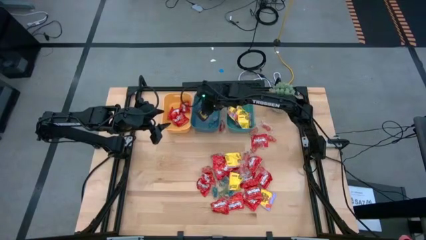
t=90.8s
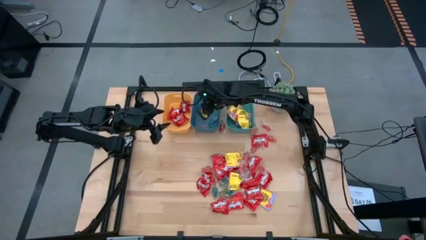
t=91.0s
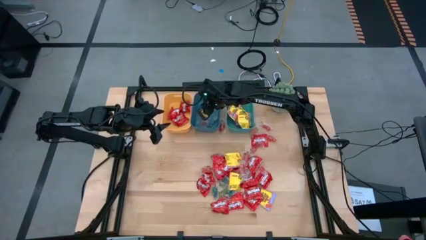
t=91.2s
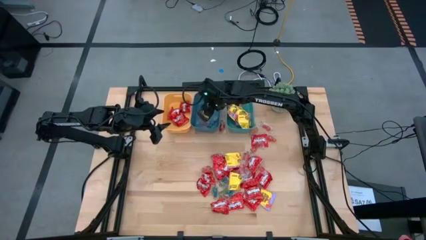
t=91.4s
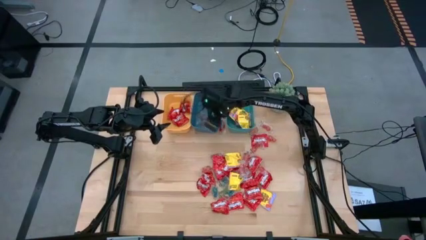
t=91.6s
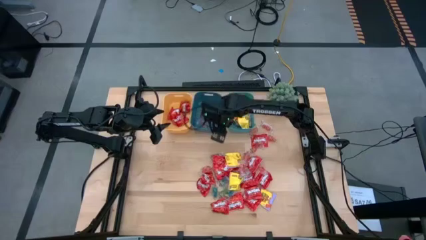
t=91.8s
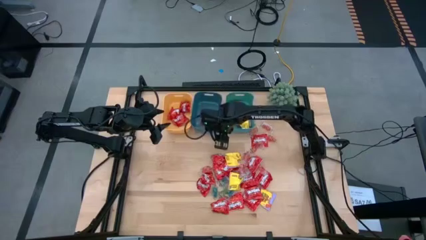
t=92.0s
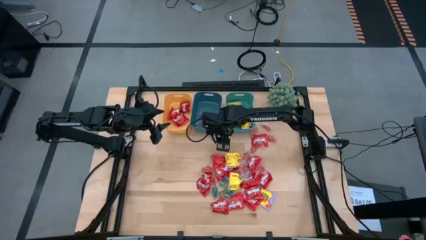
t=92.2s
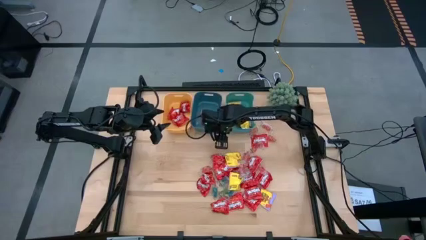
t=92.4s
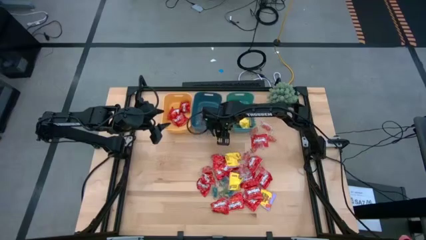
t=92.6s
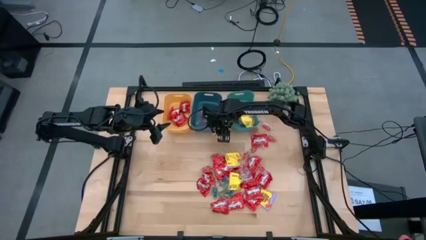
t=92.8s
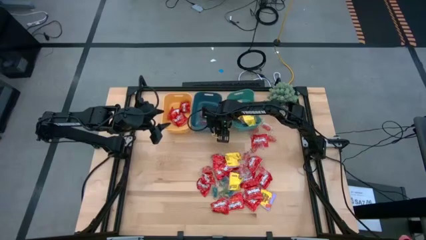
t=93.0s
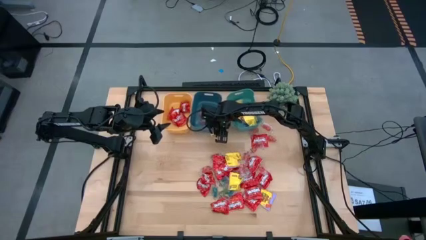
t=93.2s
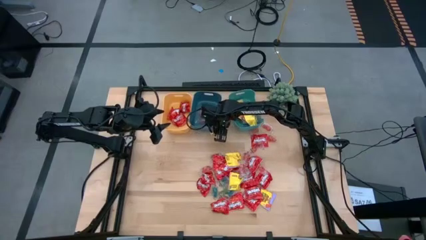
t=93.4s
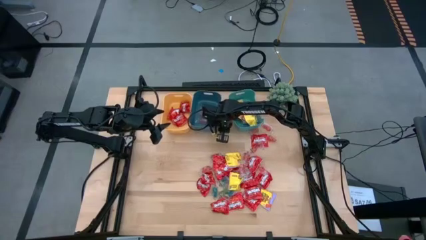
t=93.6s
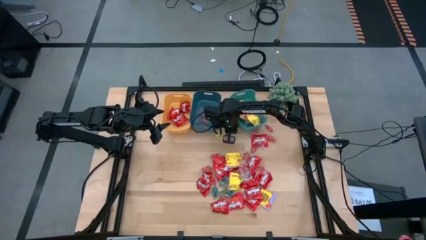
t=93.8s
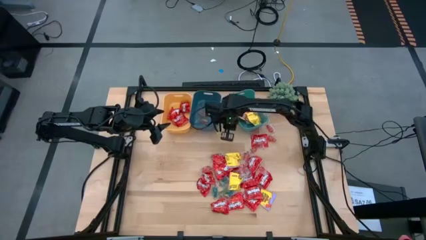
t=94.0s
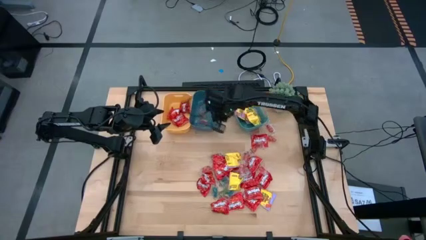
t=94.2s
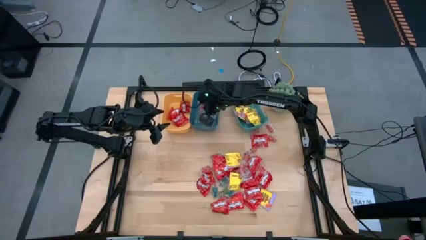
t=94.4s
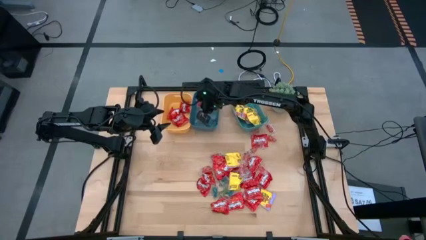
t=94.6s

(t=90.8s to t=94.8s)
Task: Sort candy
Put the transparent red gummy into the blue bin

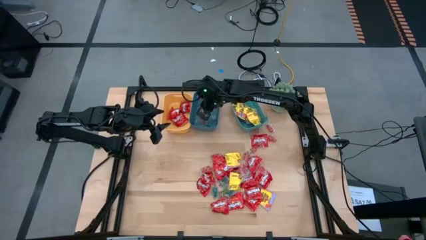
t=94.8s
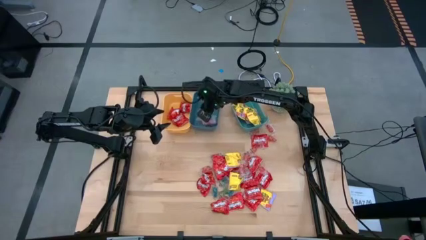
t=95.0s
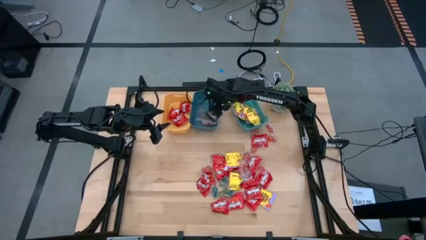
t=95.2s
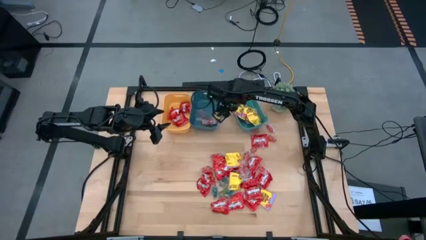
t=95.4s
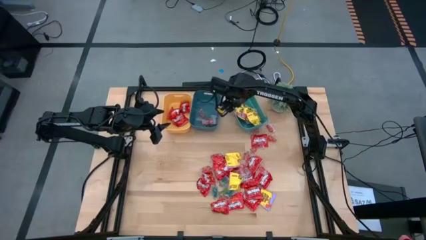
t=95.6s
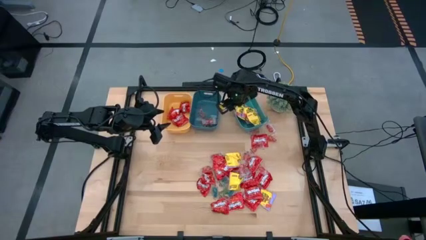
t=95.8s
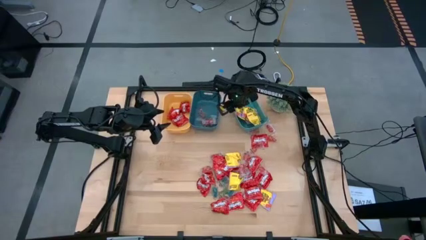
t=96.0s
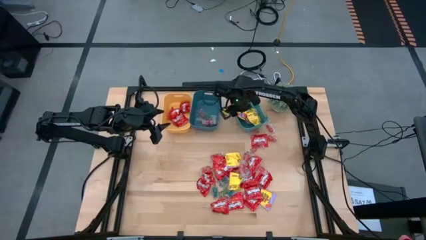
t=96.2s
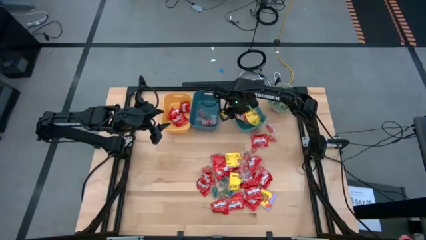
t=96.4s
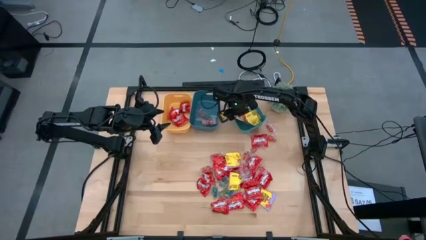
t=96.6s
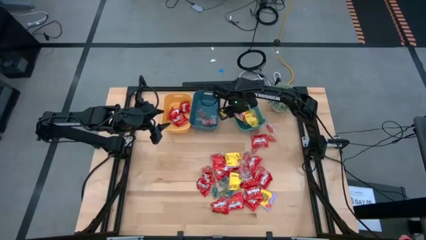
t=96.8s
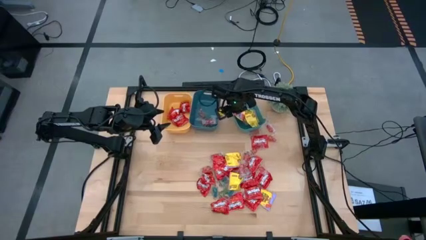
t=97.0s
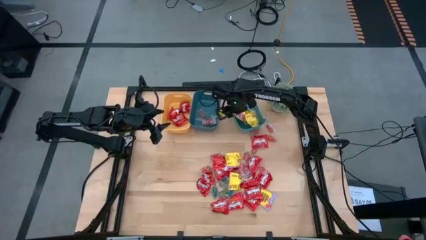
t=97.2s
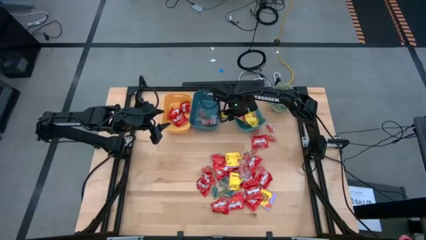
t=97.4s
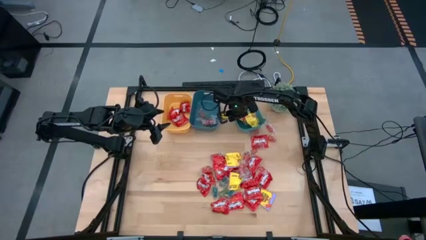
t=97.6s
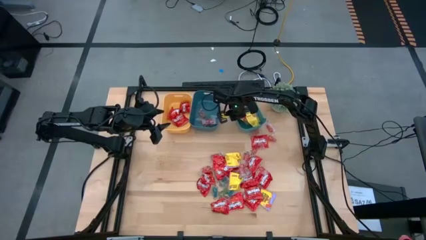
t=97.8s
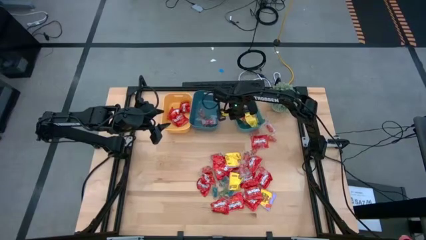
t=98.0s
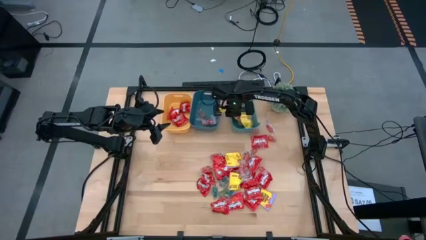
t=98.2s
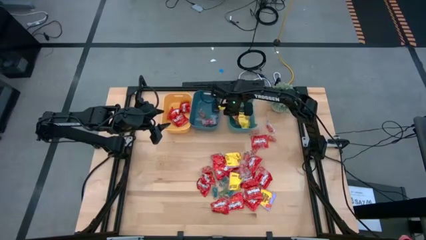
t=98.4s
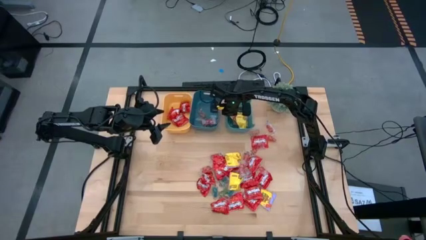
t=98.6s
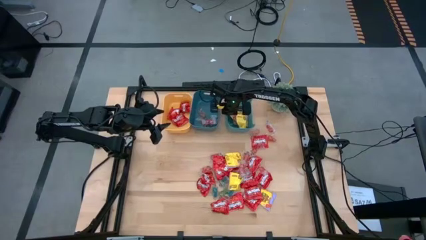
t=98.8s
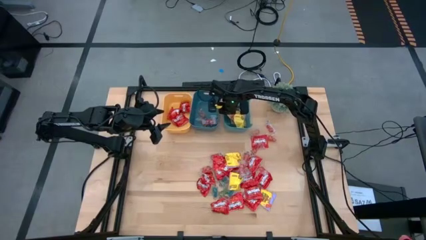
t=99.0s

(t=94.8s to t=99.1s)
Adjust the green bin

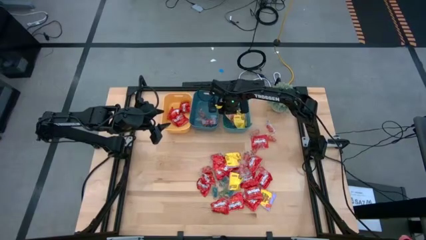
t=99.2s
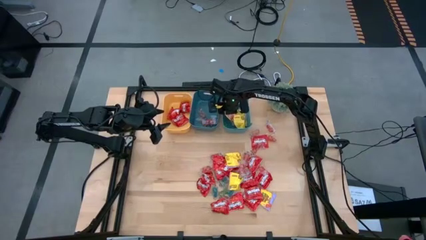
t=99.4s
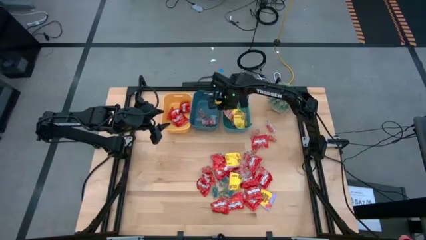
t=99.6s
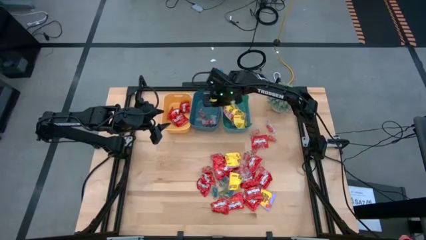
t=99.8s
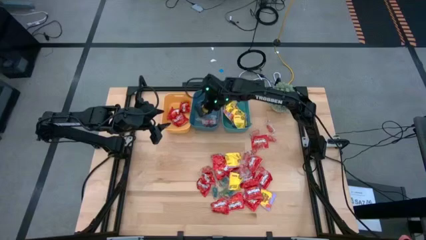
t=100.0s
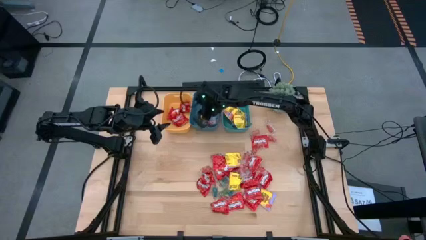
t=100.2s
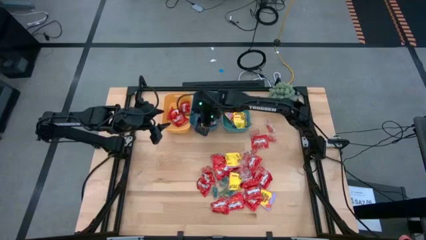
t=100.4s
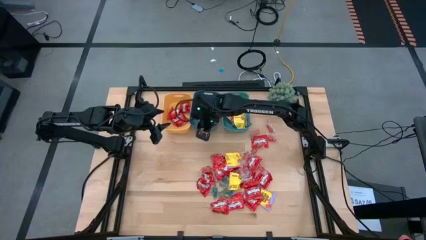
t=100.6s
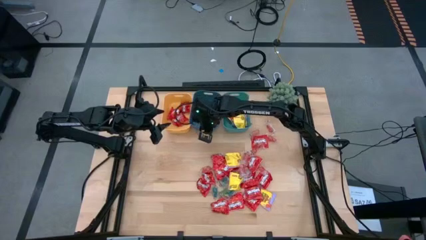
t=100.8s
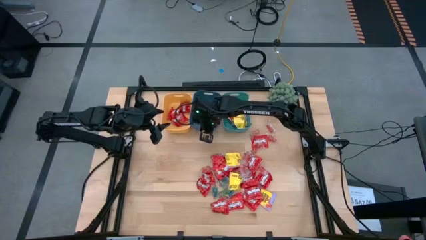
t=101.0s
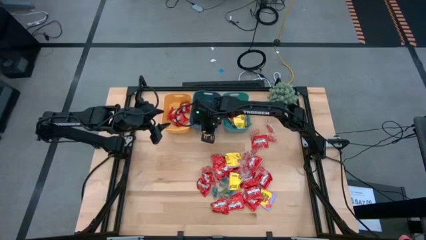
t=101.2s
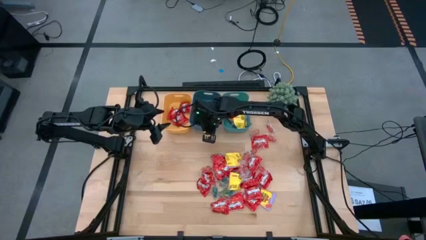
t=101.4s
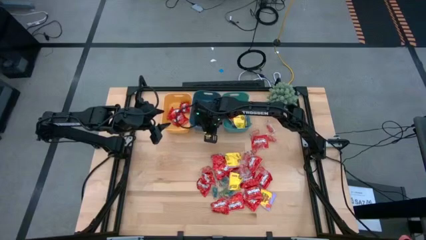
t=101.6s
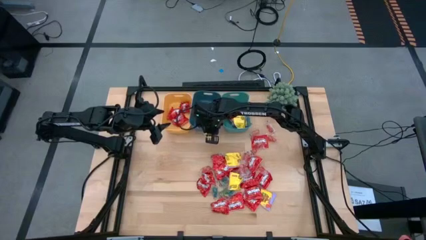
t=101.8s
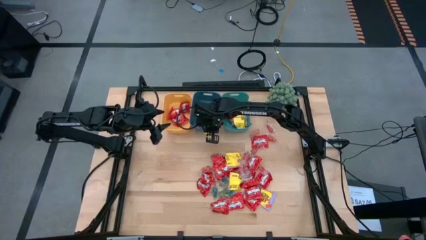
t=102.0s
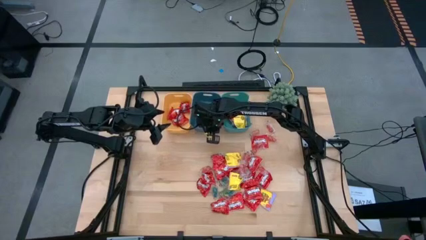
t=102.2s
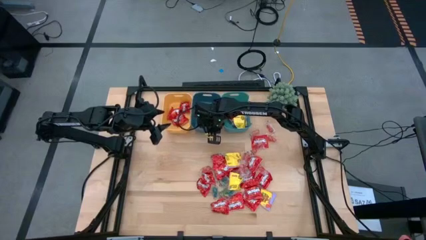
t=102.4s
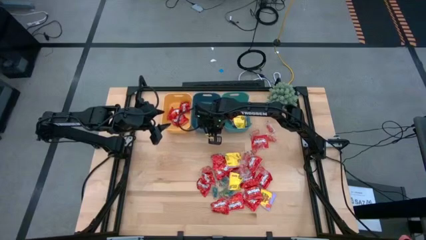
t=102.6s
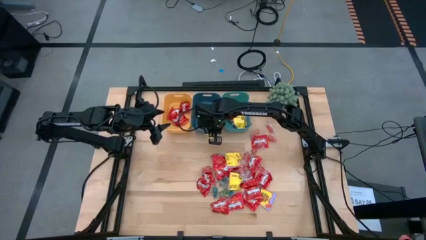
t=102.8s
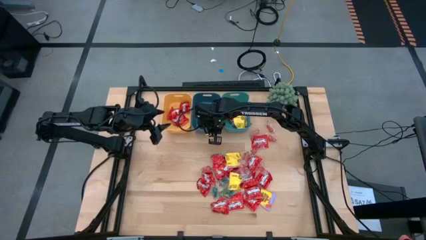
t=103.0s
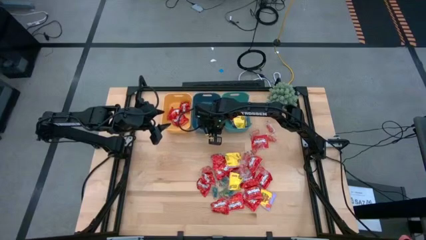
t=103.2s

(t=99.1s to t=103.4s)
Adjust the blue bin

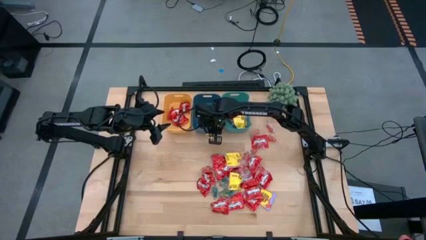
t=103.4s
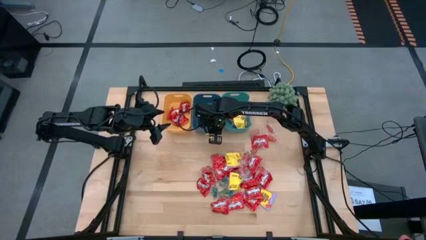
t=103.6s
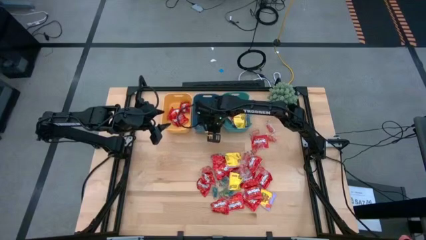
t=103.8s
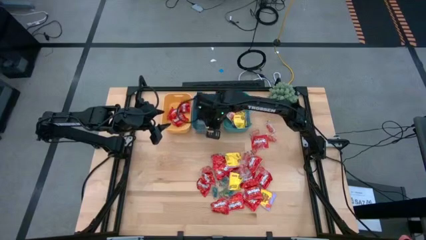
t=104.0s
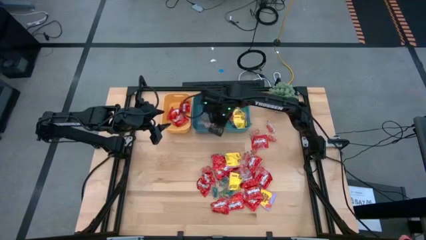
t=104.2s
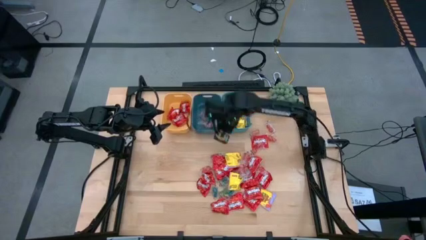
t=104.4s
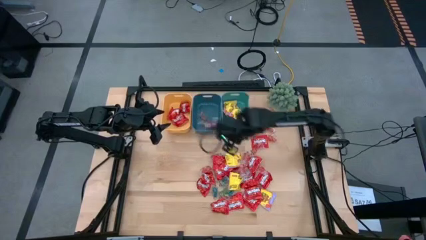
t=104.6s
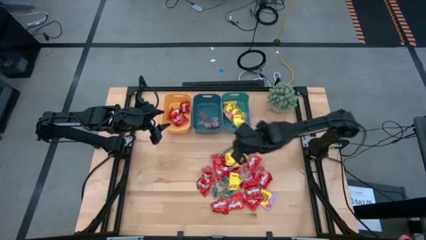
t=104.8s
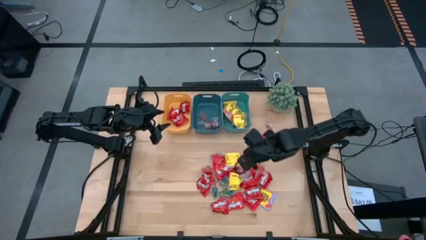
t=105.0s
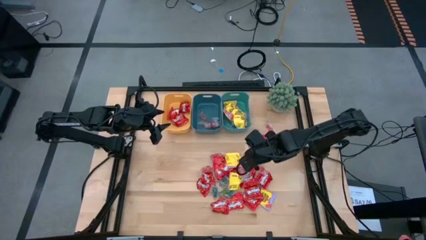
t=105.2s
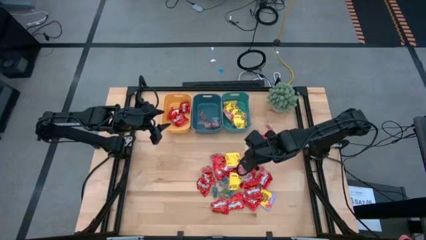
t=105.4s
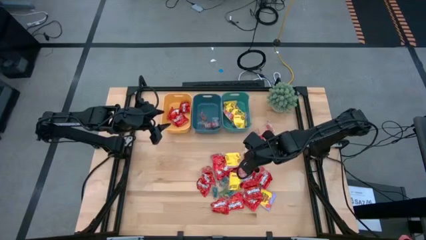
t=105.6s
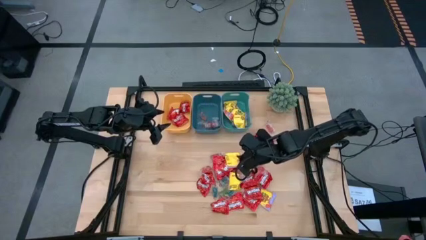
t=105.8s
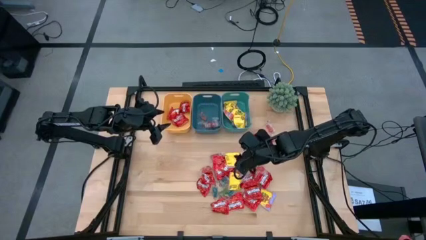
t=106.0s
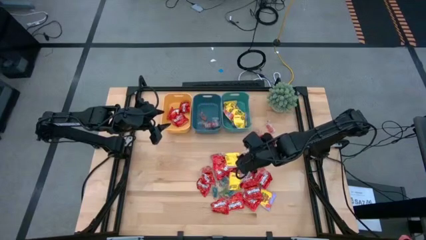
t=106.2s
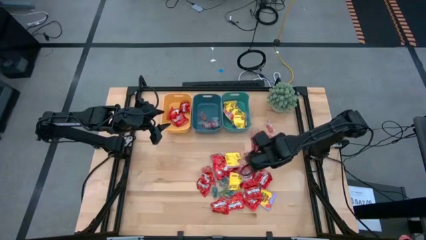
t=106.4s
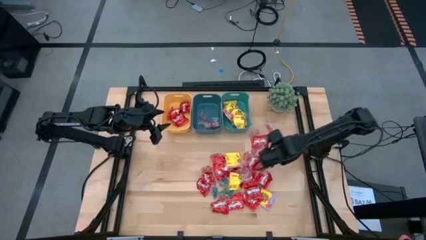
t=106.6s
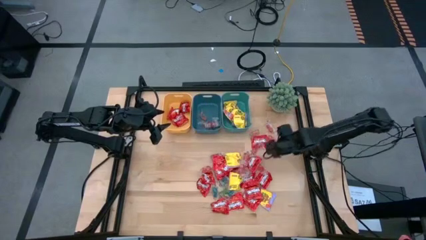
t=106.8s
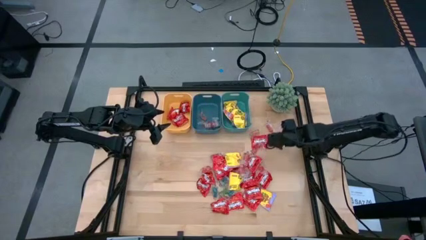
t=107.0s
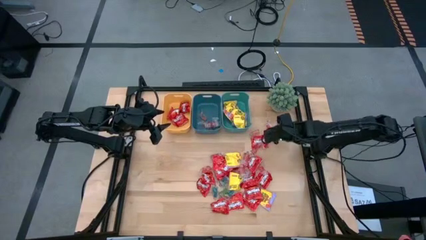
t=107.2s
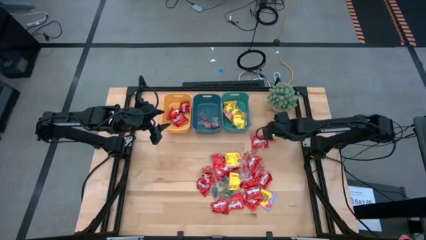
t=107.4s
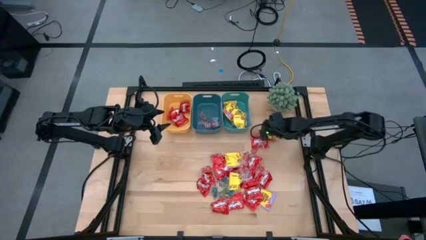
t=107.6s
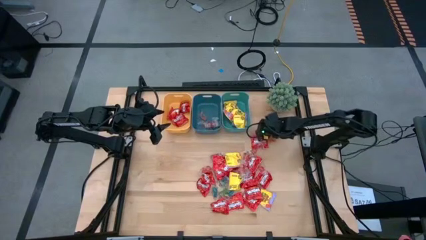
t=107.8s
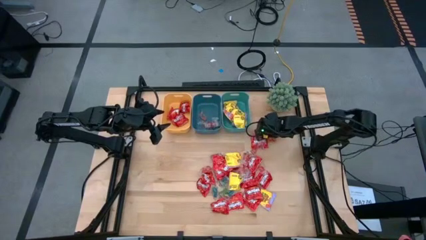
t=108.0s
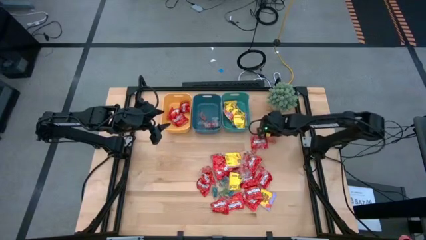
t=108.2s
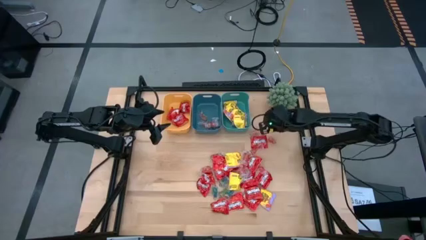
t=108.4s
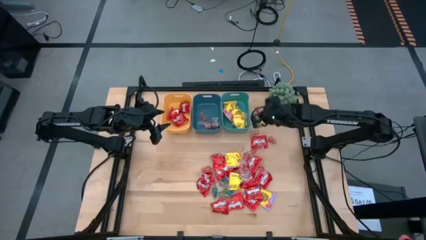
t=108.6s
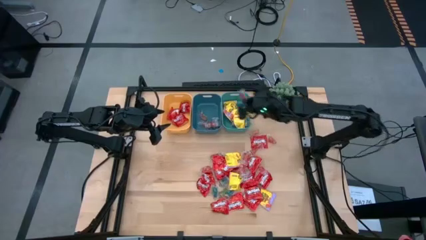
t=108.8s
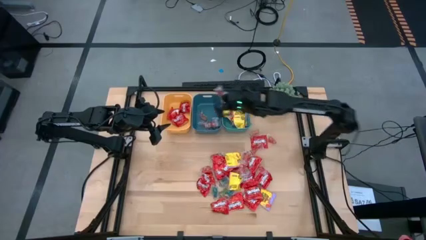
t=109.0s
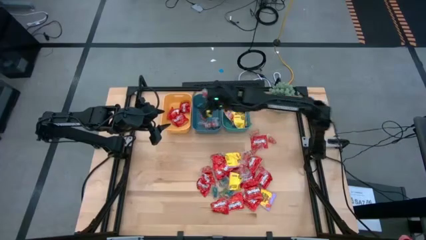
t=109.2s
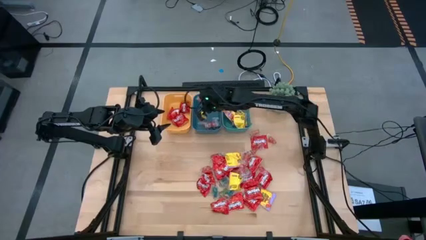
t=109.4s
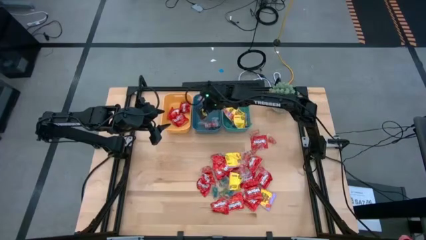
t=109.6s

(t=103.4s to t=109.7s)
Put the transparent red gummy into the blue bin
